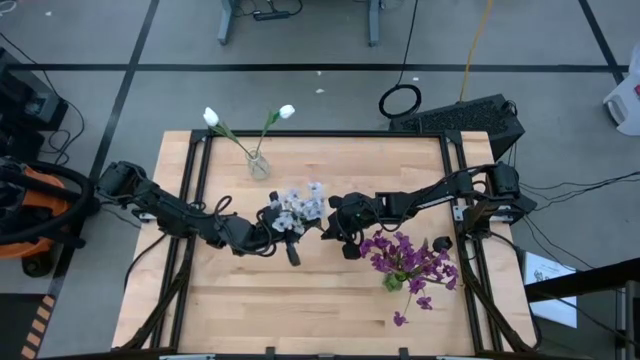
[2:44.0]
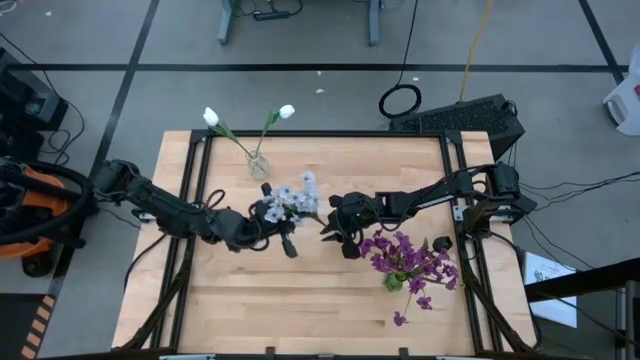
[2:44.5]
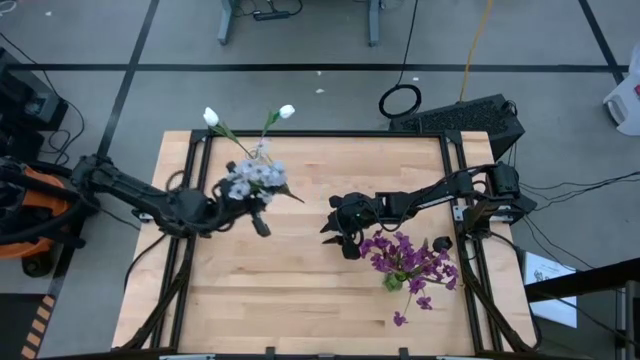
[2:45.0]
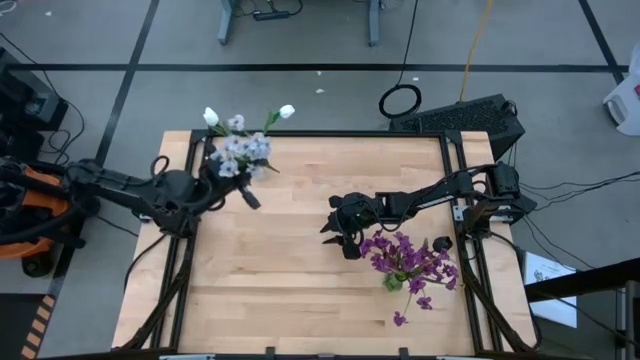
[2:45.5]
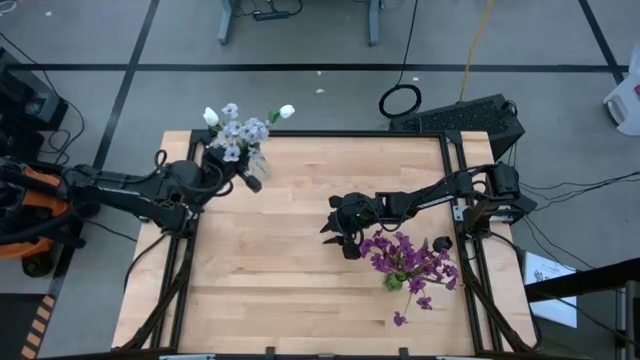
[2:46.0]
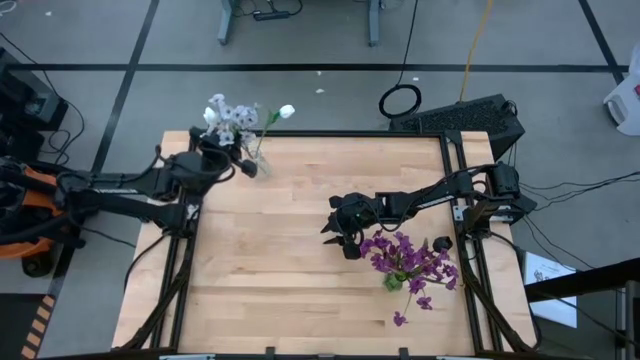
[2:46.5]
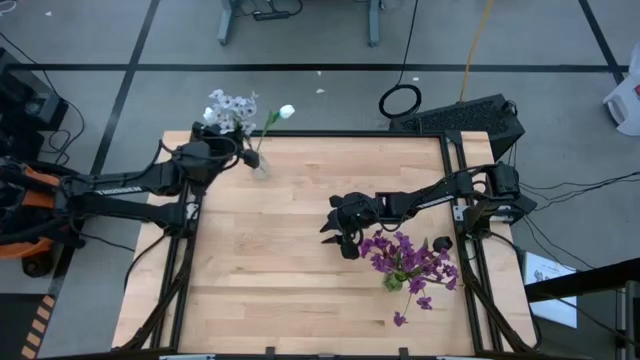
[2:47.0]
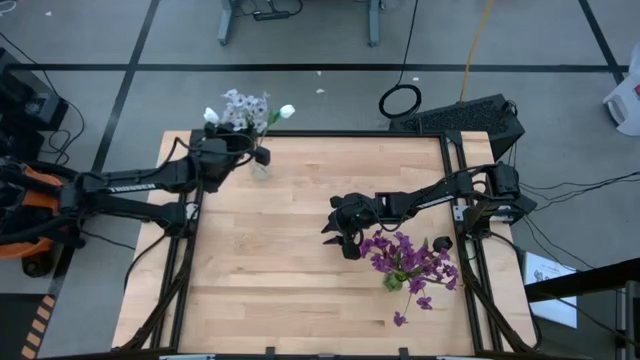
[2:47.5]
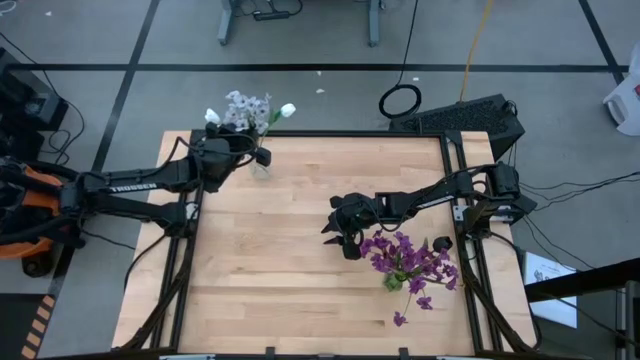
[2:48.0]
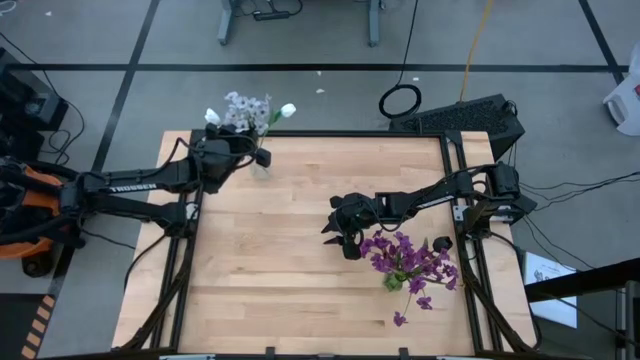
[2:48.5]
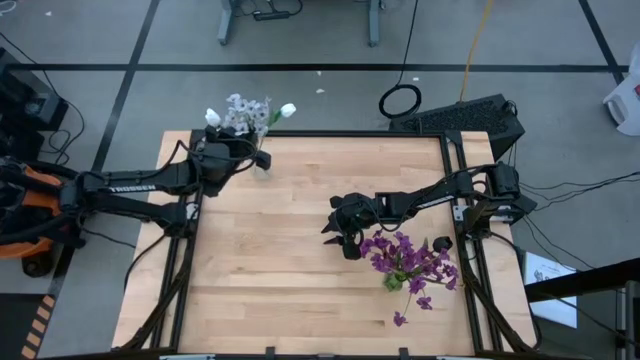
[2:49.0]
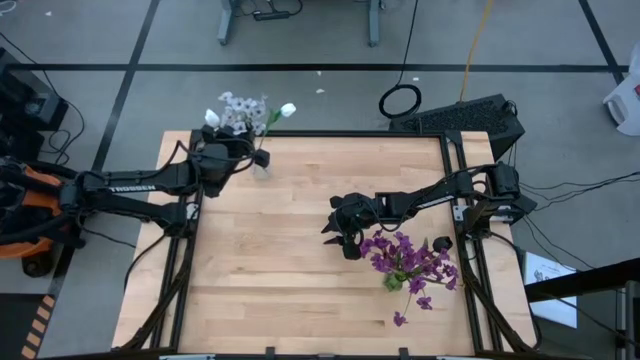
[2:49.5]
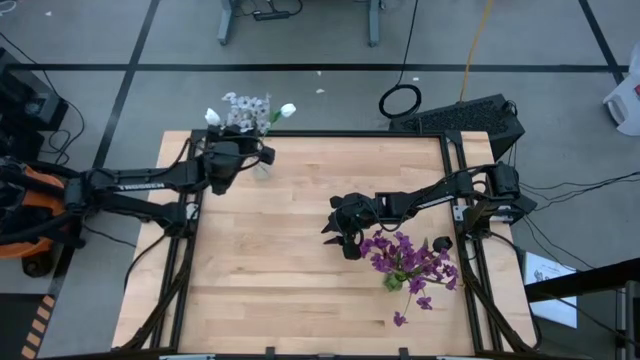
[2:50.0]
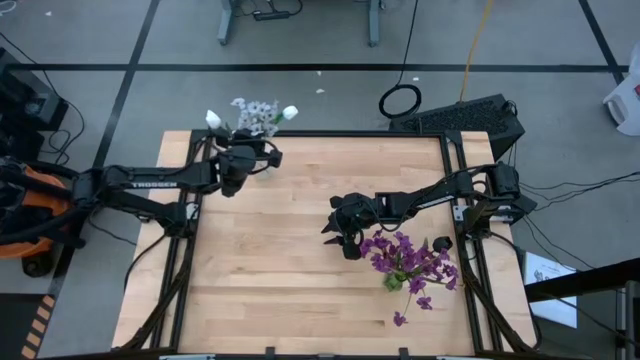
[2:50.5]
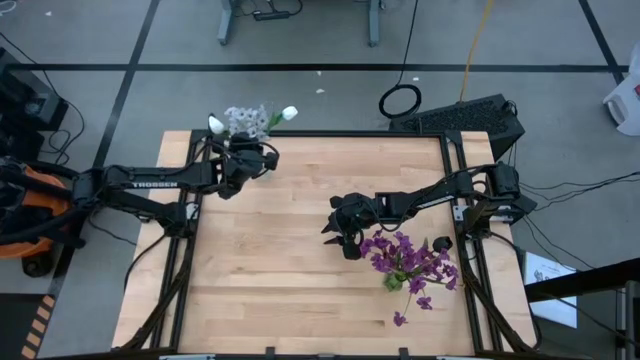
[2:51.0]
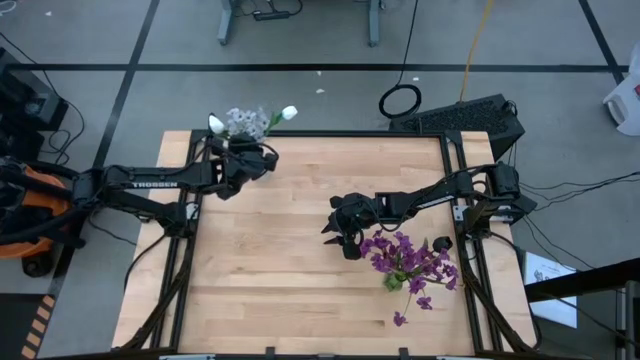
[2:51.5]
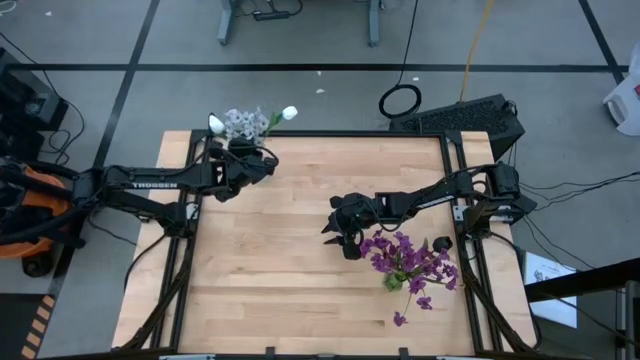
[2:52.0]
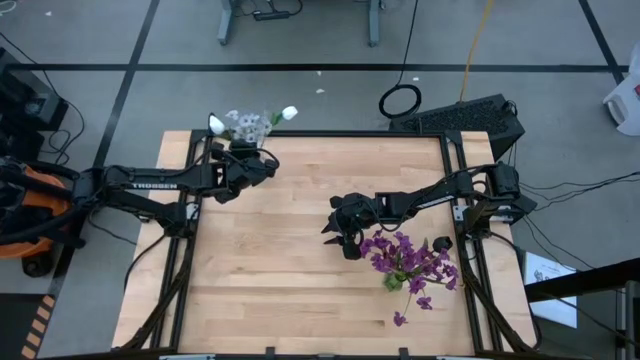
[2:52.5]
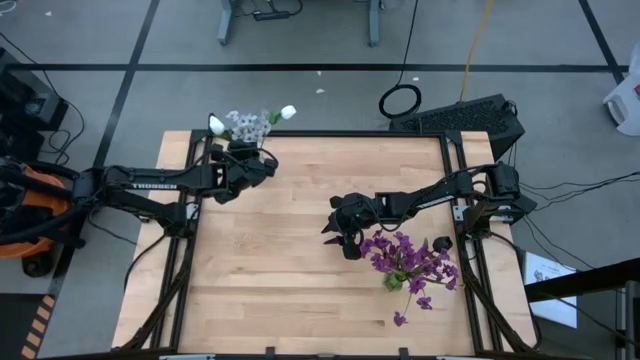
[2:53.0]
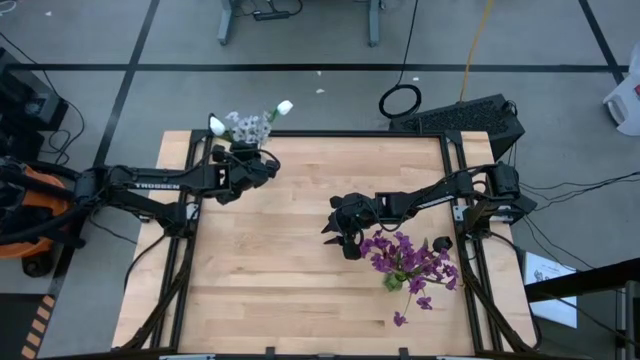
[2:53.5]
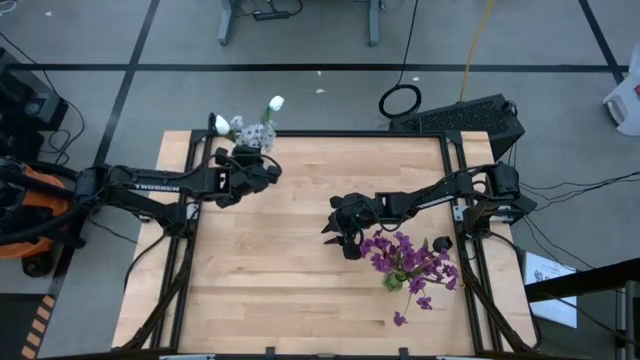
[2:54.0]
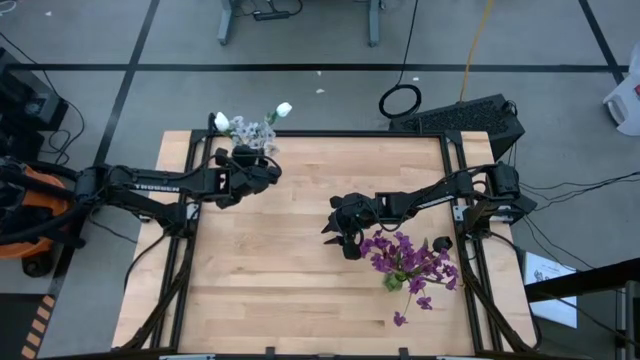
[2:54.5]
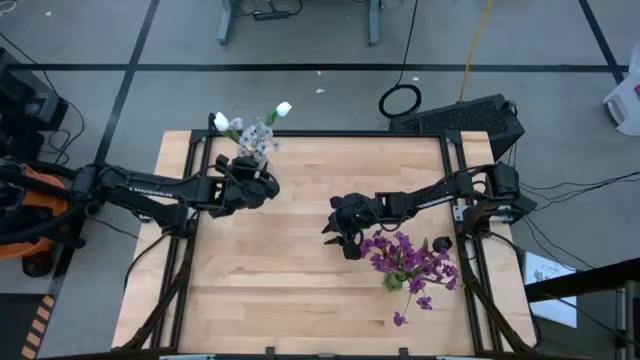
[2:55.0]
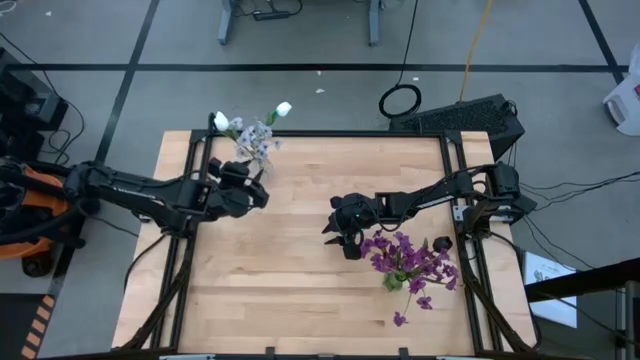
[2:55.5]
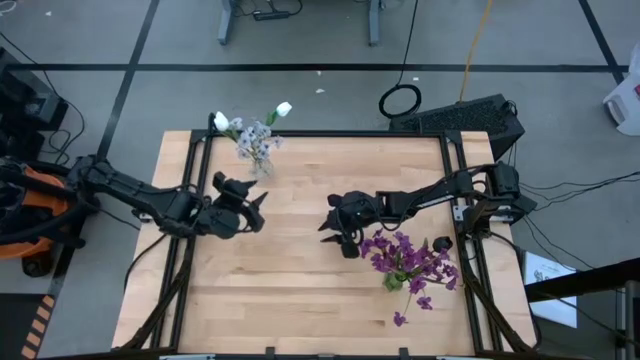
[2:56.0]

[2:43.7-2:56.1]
Task: Sort flowers into vase by color
Put the white flower into the transparent vase

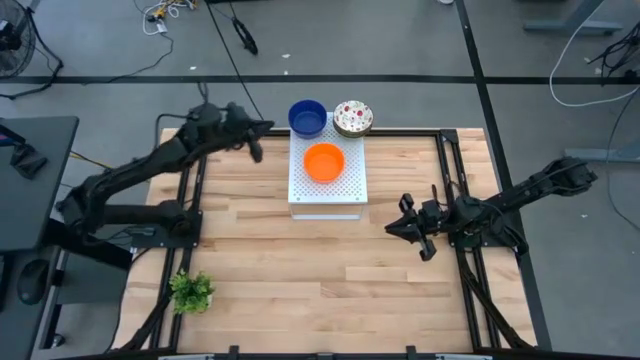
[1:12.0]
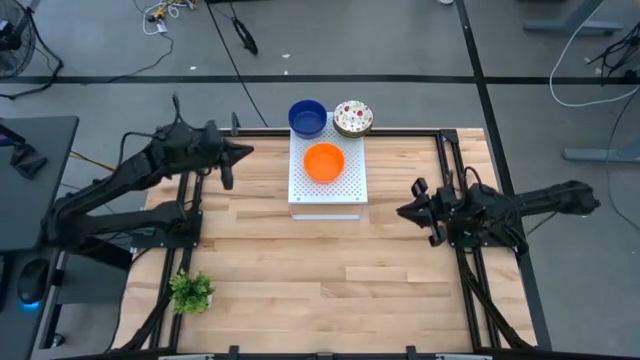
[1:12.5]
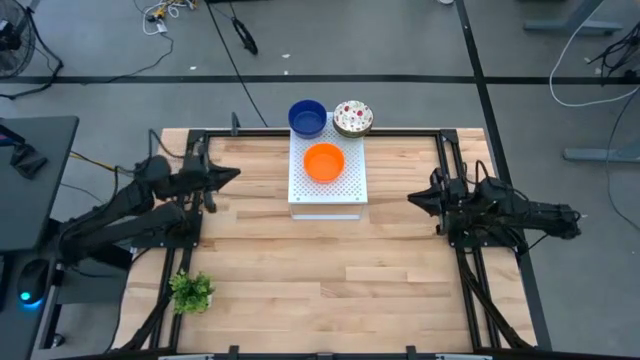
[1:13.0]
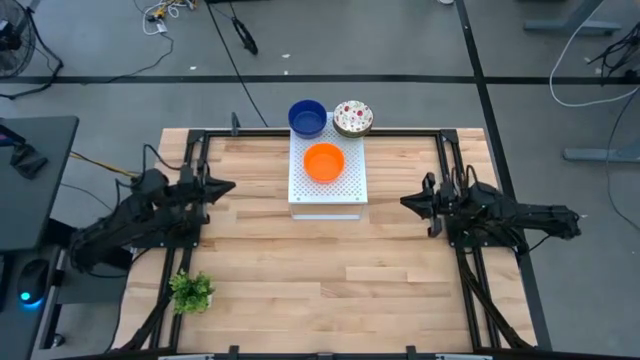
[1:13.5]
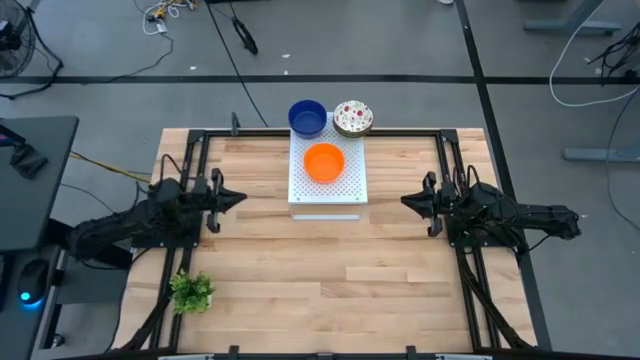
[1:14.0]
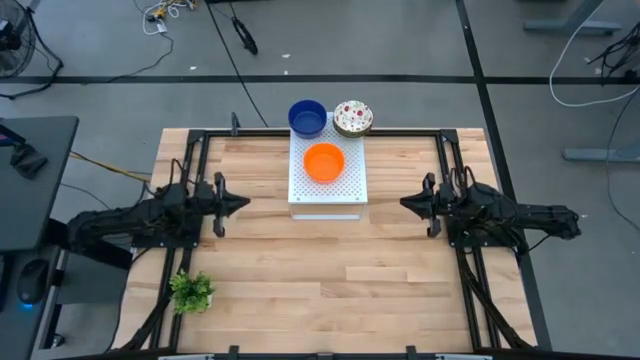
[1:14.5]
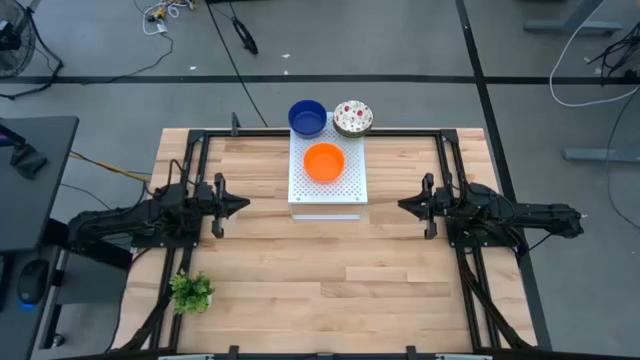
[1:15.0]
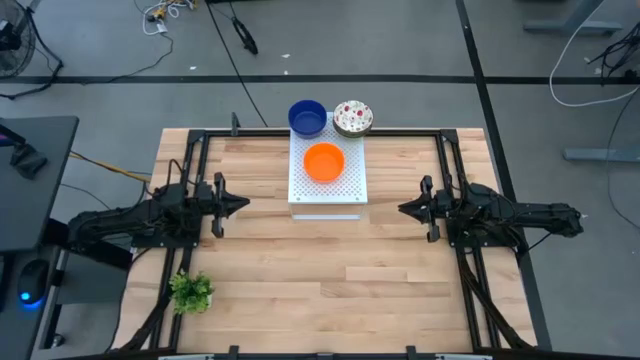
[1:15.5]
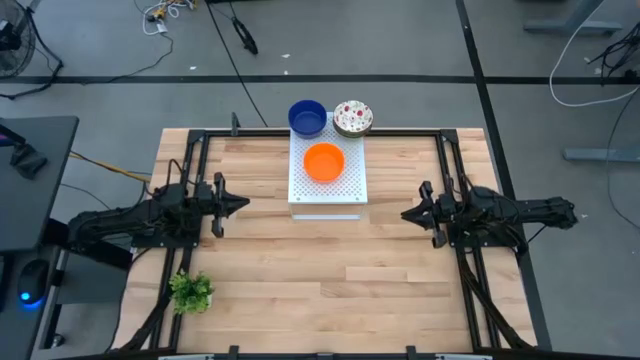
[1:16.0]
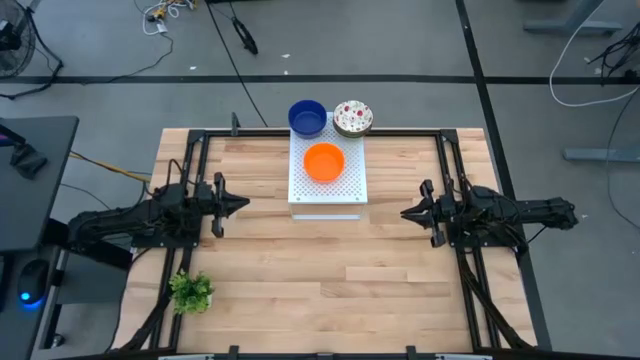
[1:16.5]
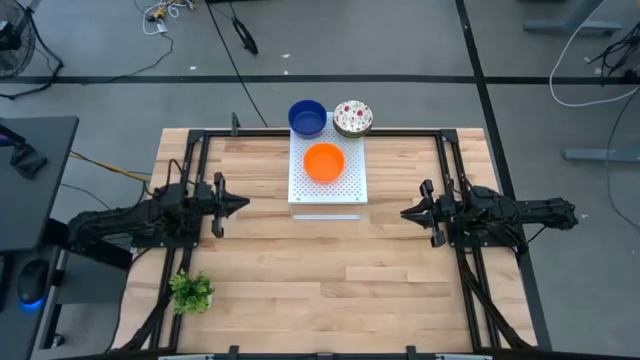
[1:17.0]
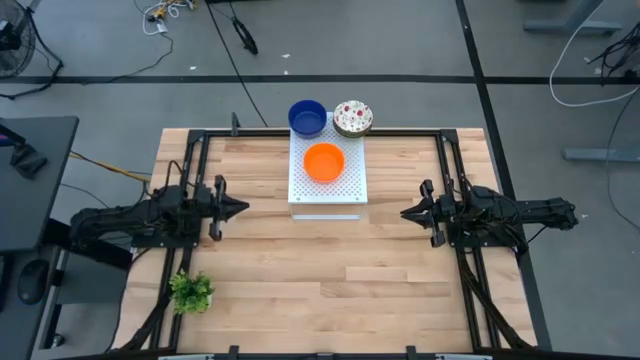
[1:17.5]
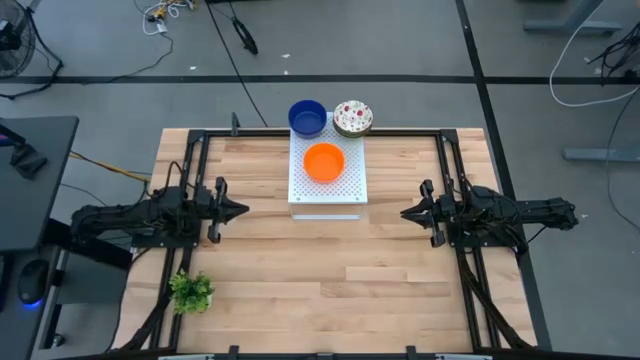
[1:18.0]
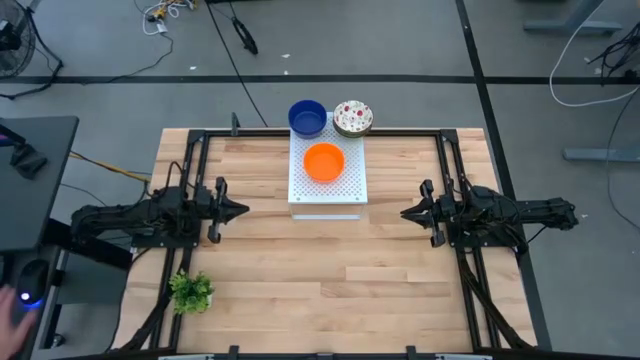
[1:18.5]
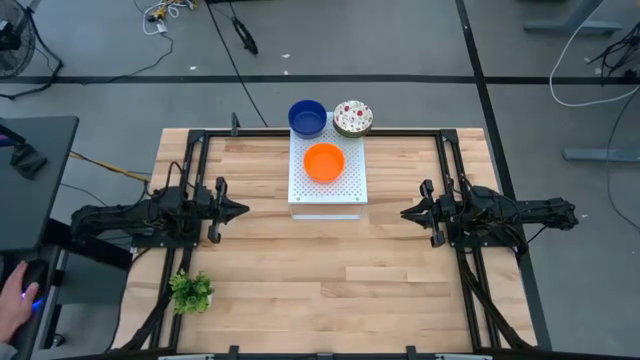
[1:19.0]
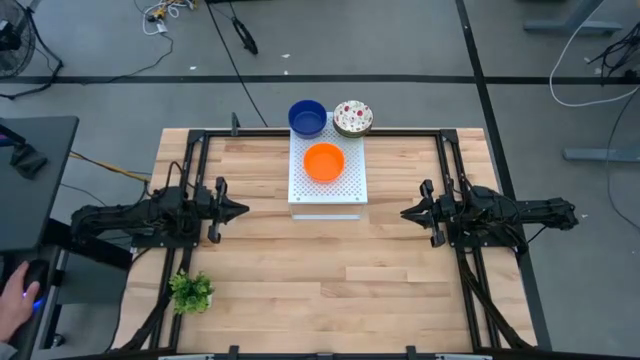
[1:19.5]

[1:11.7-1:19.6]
Task: Pick & Place Mini bowls
Return to Home Position

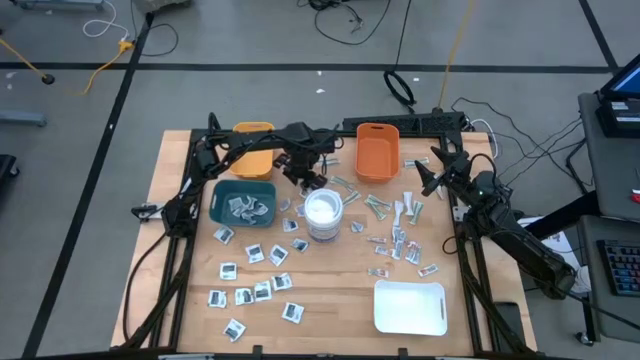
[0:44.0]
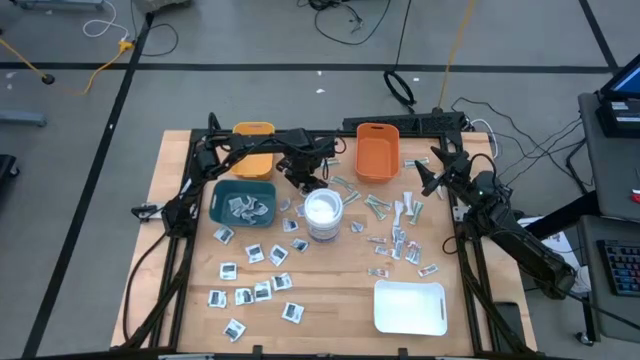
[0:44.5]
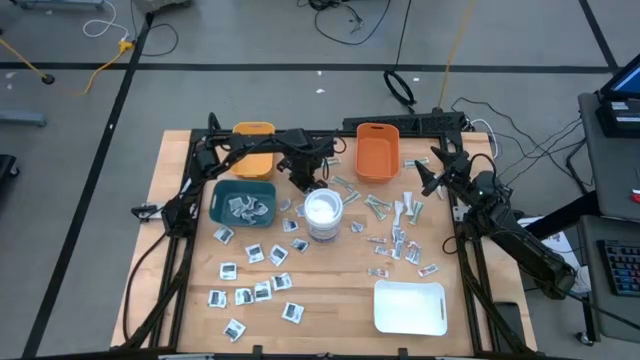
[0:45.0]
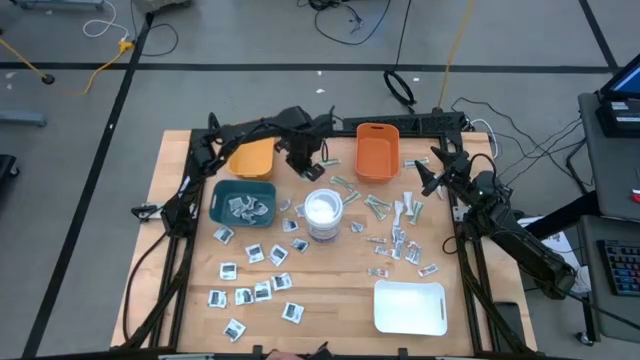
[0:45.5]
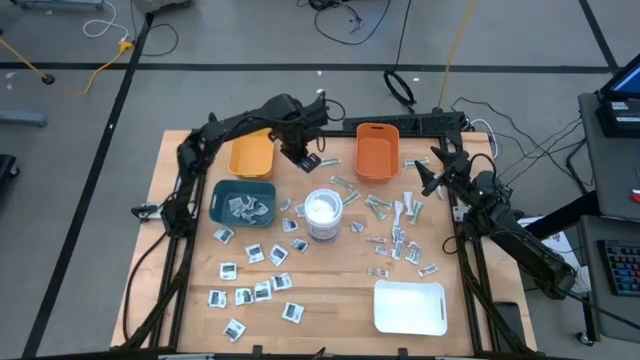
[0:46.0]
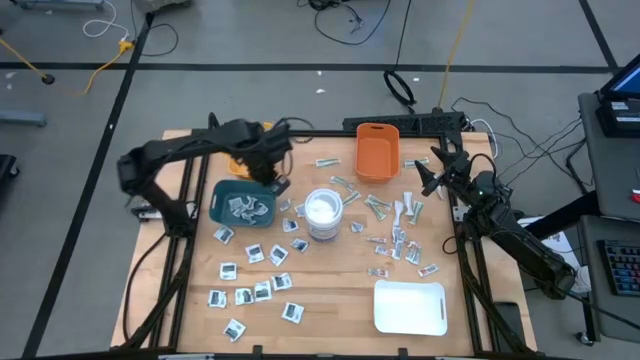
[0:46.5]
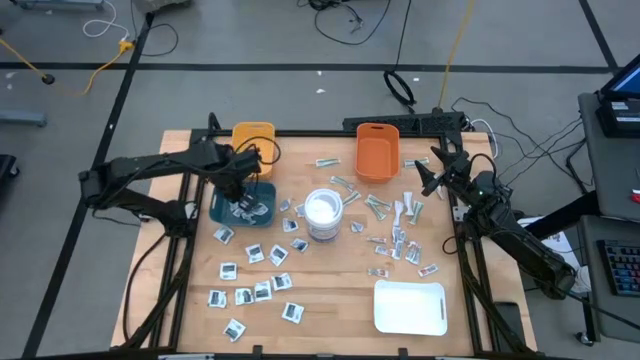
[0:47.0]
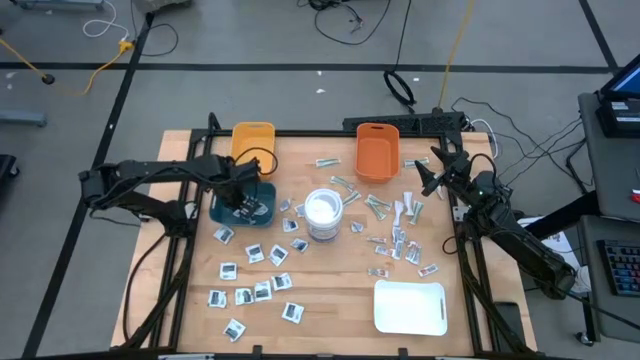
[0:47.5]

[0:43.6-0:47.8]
Task: Pick & Place First Aid Supplies
Put the blue pad into the blue bin
